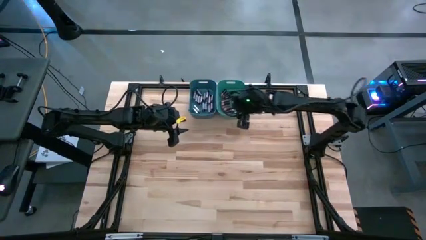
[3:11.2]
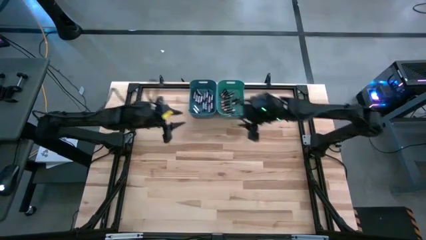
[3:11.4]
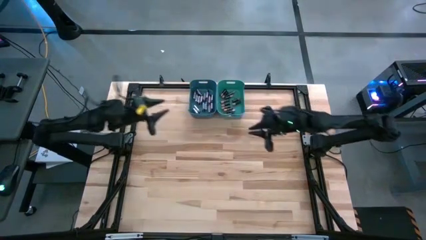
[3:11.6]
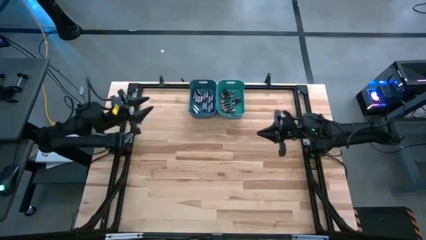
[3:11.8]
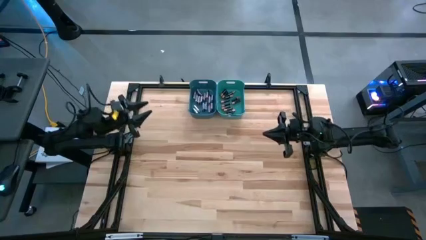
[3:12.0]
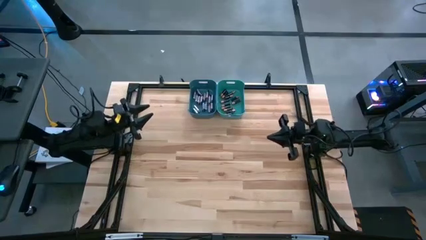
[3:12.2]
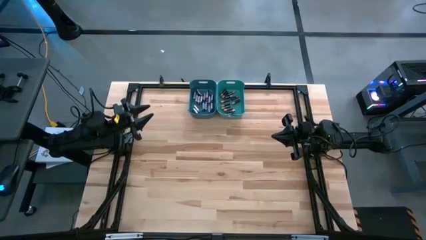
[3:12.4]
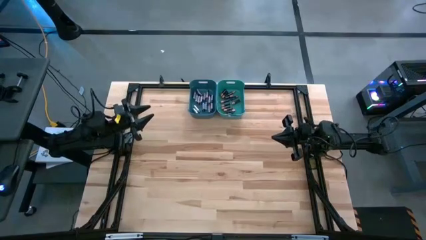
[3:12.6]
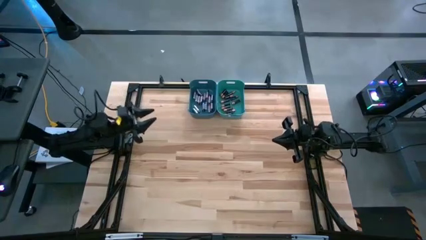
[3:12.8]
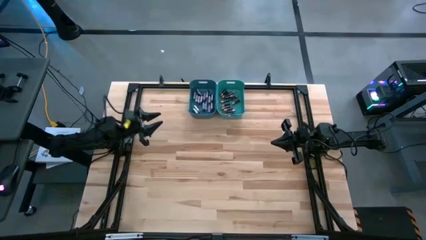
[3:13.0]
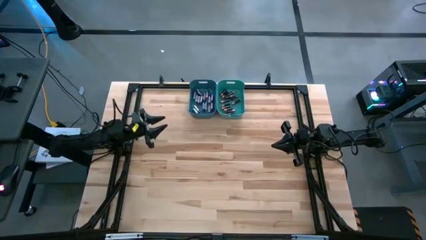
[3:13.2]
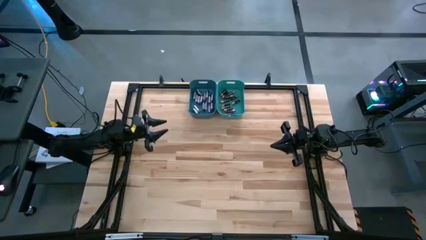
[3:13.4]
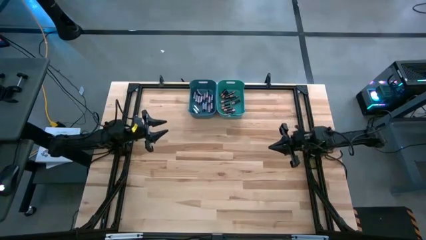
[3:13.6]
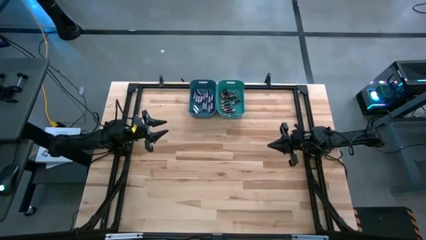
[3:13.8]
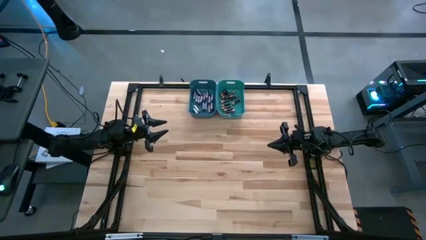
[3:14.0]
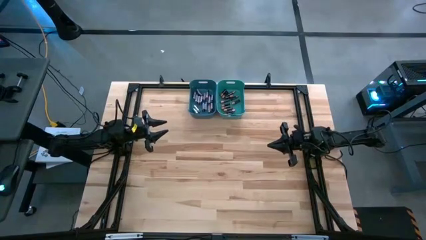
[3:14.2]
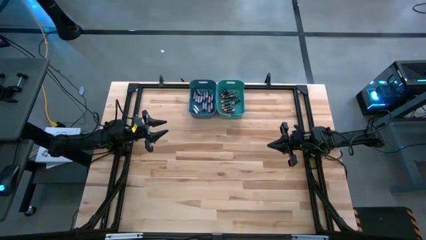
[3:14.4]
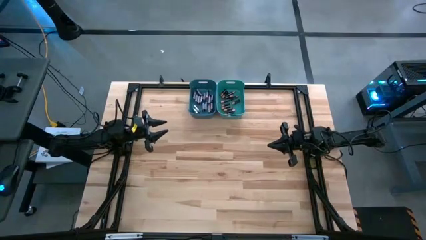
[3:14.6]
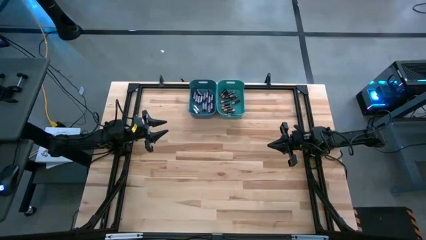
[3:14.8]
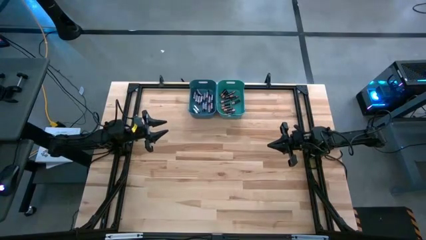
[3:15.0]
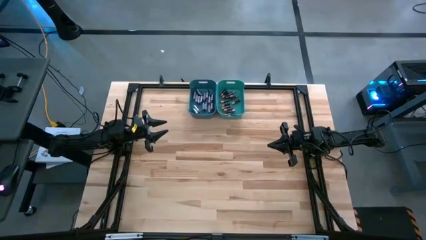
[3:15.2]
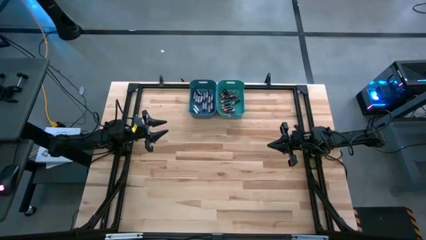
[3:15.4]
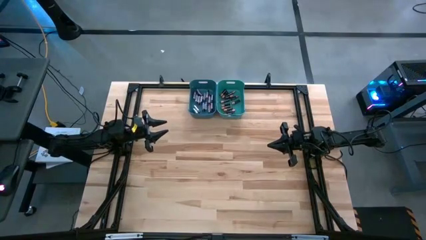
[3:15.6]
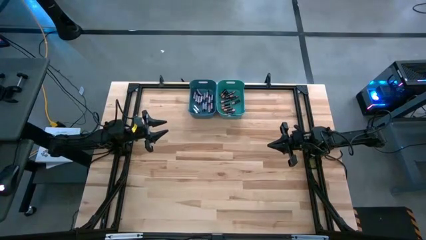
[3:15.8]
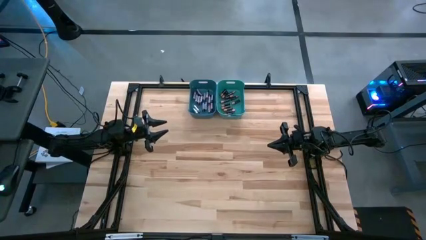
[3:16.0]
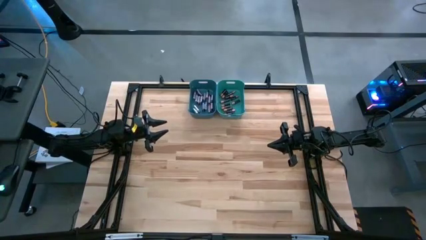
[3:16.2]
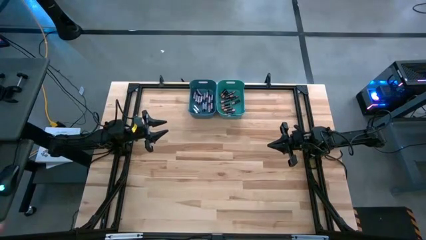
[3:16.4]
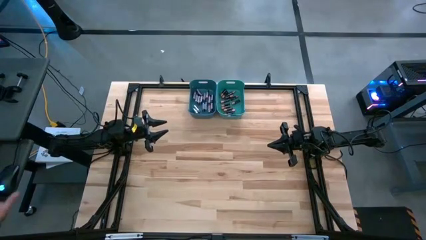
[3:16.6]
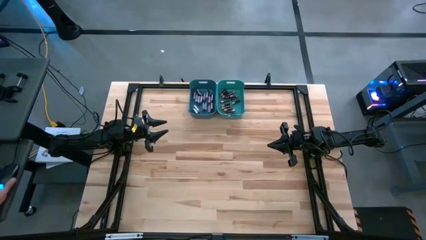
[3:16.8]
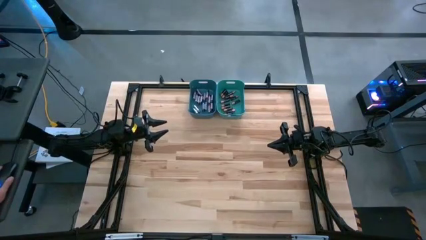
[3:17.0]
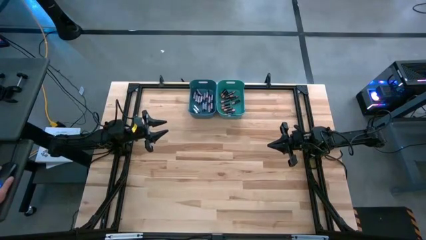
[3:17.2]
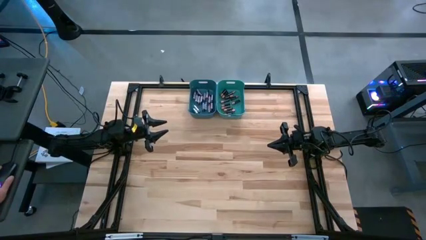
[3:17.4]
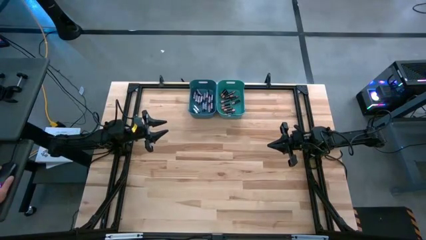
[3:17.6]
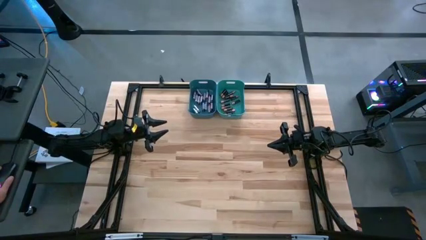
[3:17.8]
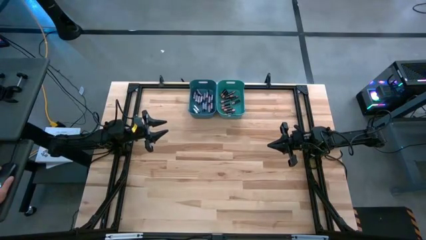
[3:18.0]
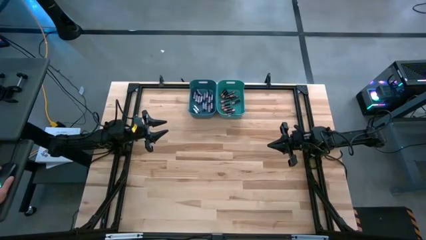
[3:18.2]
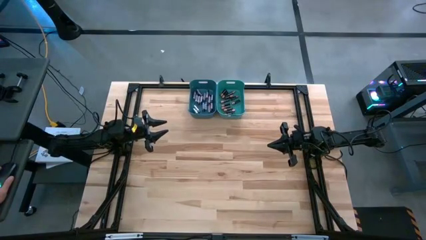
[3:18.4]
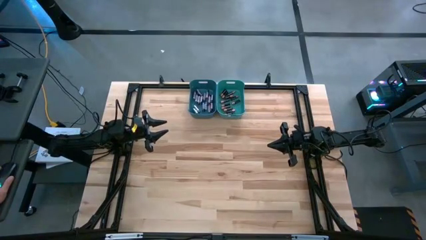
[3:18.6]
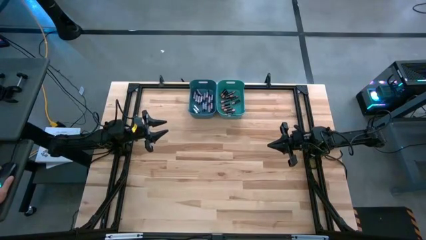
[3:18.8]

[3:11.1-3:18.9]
Task: Sort batteries
Return to Home Position

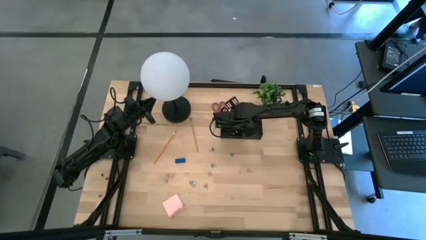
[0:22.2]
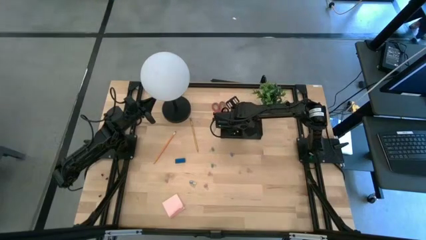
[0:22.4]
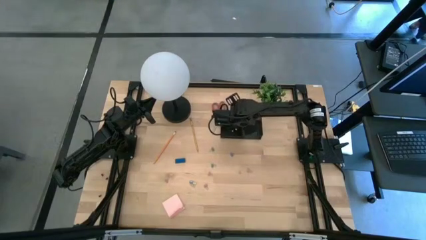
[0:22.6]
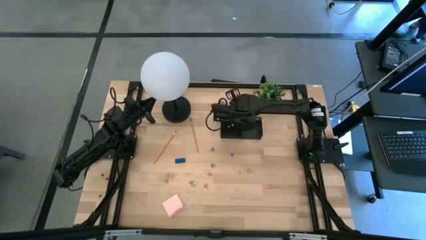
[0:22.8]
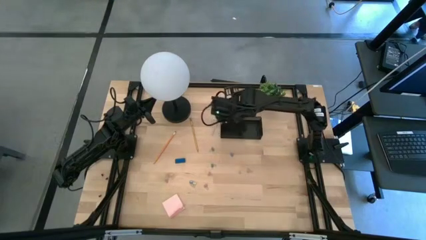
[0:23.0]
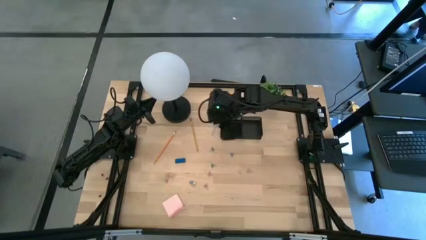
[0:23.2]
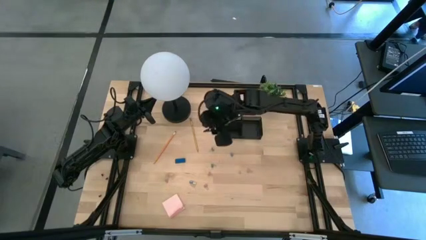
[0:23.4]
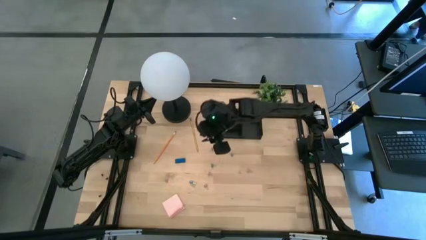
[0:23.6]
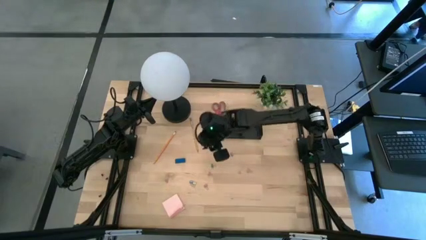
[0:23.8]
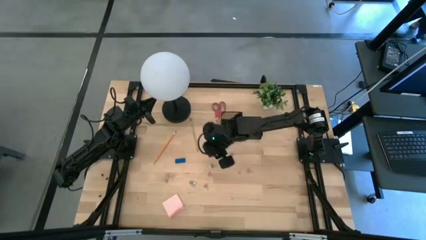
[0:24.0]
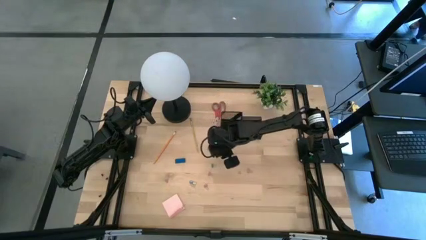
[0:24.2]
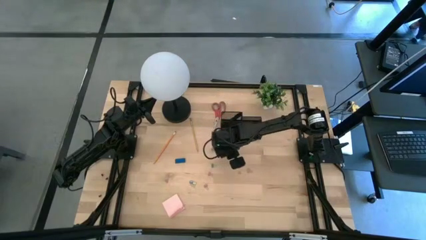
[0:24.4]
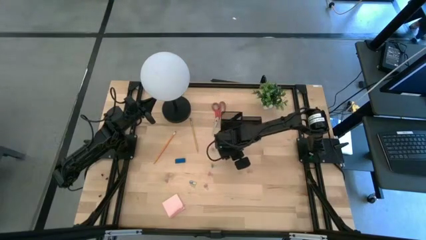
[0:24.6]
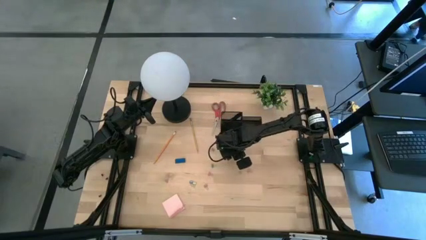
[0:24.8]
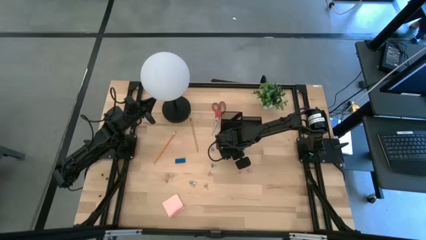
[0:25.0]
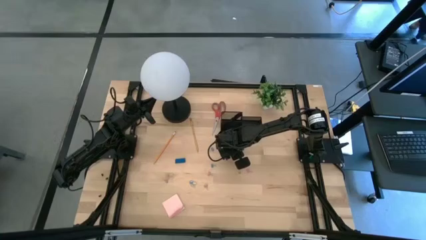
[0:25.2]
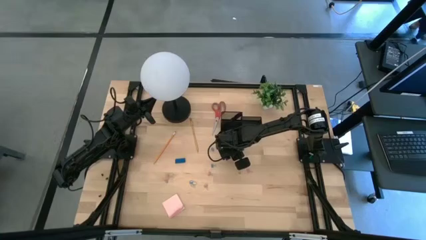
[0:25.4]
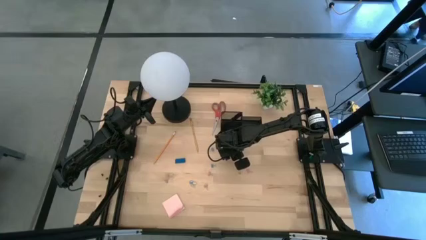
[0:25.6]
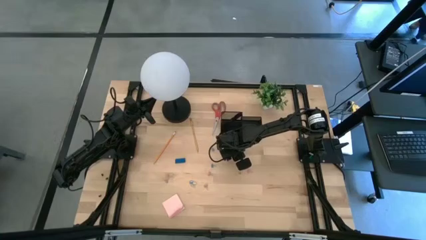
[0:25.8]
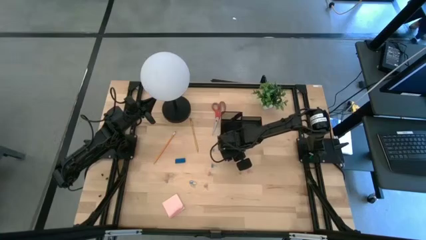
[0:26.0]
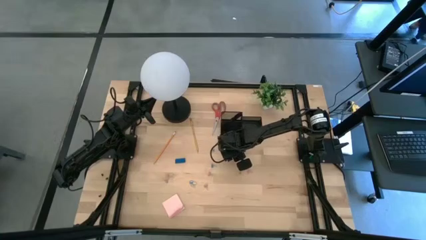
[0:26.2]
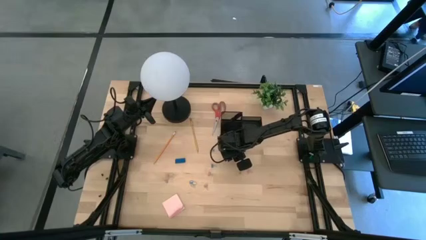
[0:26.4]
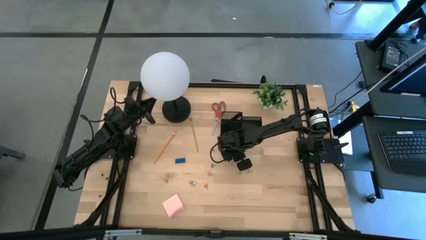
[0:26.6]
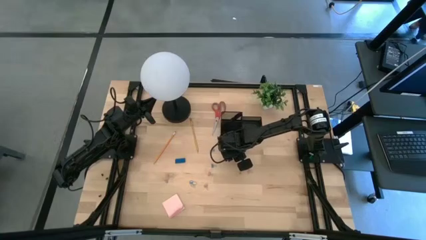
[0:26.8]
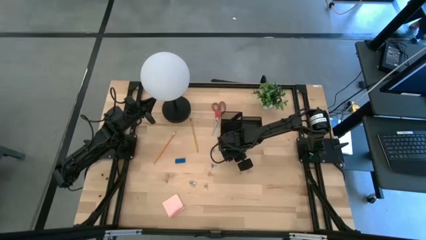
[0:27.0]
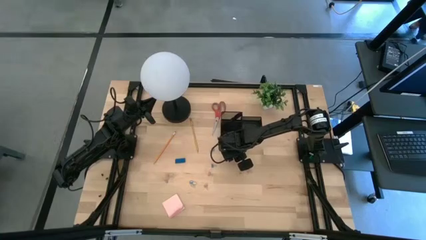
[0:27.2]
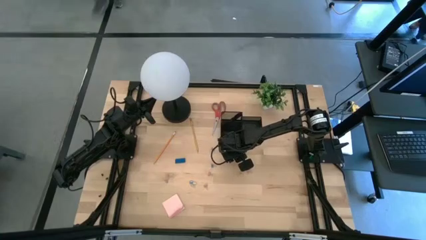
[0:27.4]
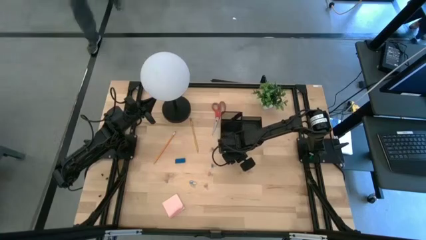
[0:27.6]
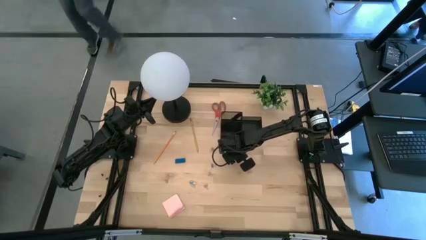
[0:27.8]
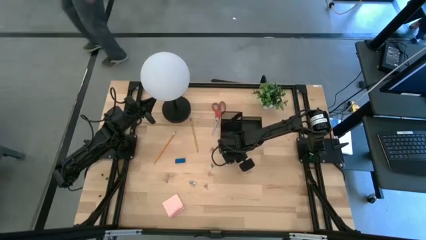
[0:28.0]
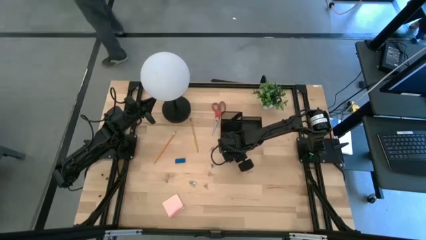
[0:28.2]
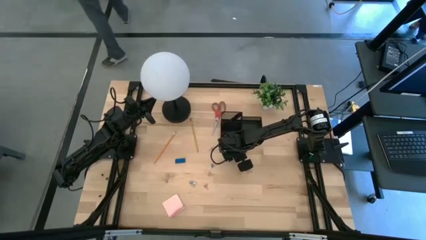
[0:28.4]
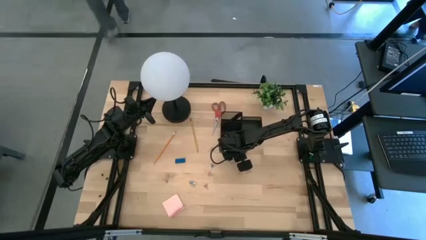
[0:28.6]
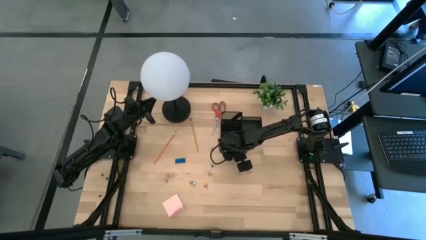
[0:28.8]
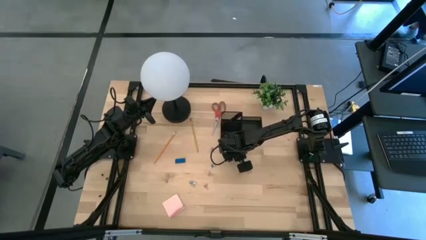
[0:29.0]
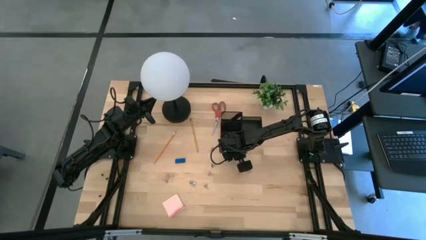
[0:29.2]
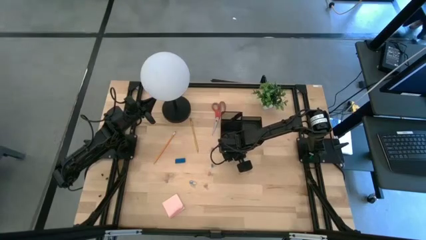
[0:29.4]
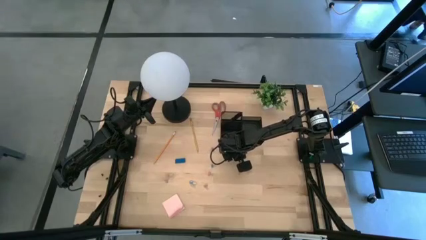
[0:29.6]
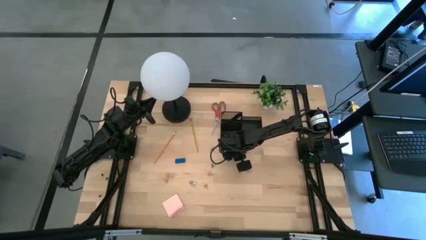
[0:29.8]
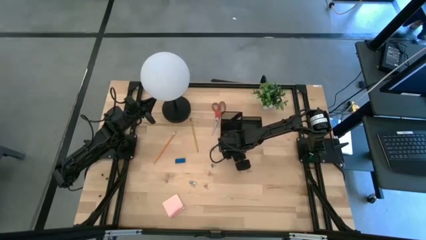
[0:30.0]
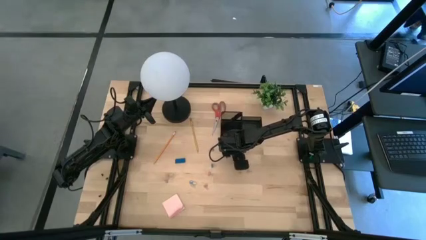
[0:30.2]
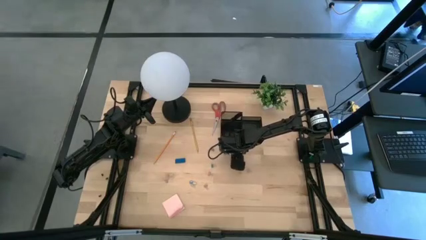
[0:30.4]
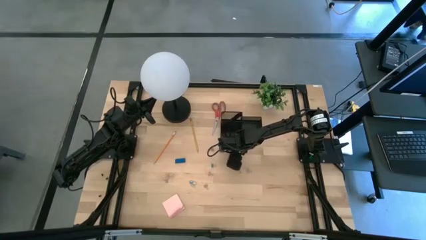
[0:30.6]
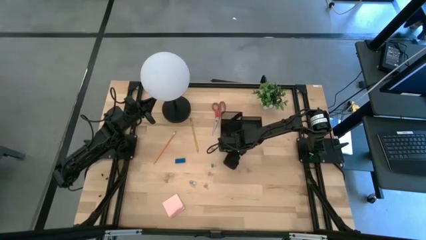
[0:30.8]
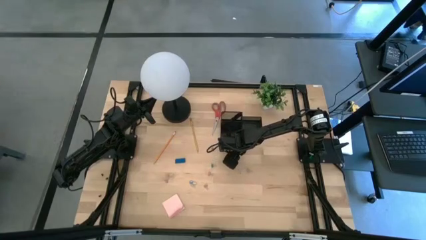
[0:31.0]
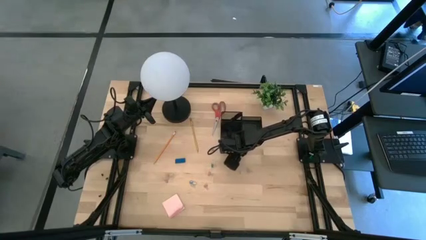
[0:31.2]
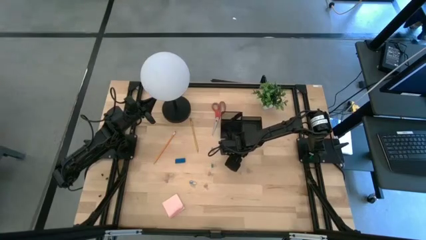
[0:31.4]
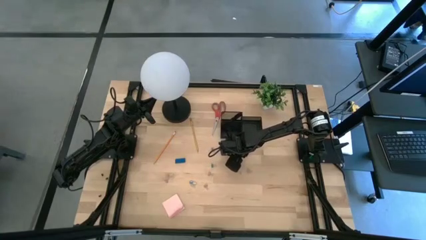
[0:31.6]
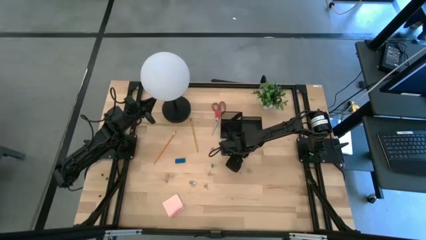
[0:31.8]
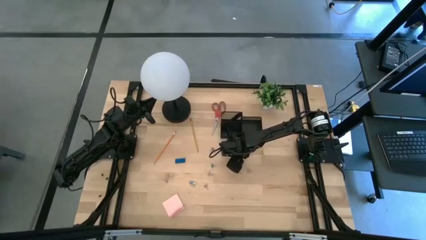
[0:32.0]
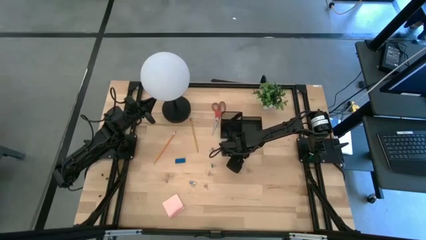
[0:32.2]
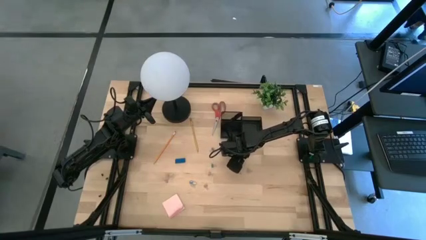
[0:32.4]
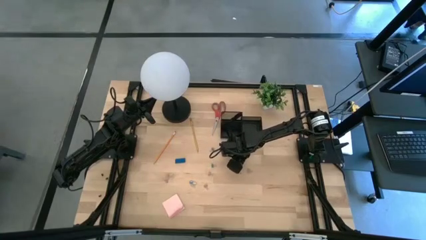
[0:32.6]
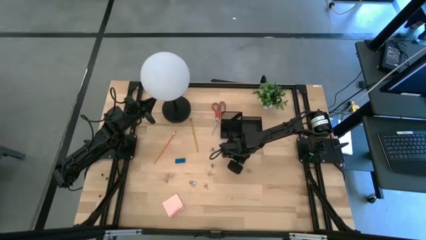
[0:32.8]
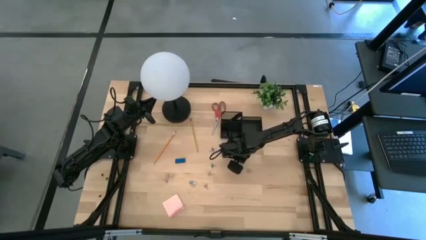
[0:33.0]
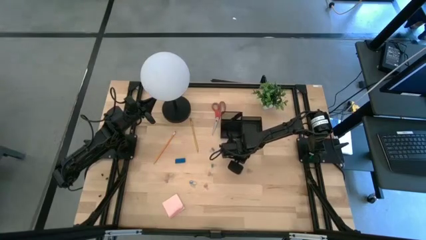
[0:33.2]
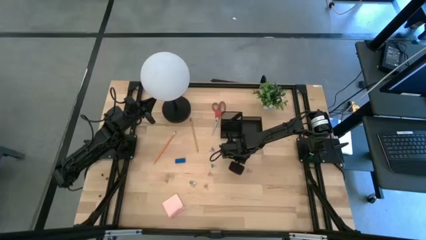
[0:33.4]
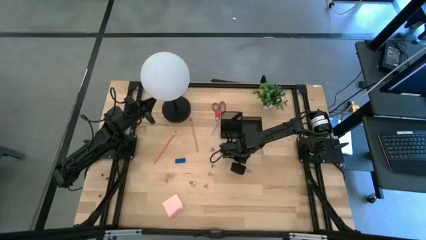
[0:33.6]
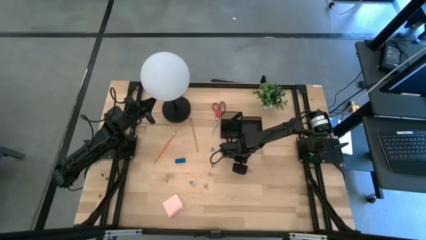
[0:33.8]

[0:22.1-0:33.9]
Task: Pick and place office supplies into organizer
Put the blue clip binder into the black desk organizer
